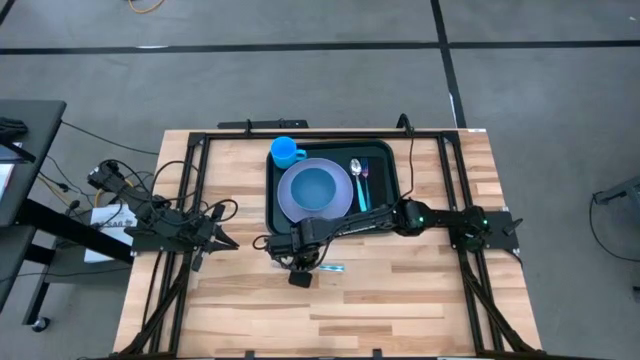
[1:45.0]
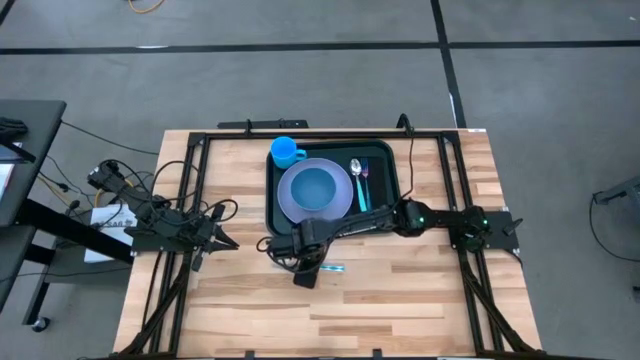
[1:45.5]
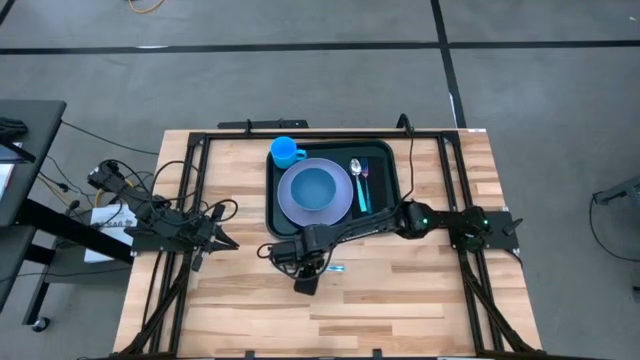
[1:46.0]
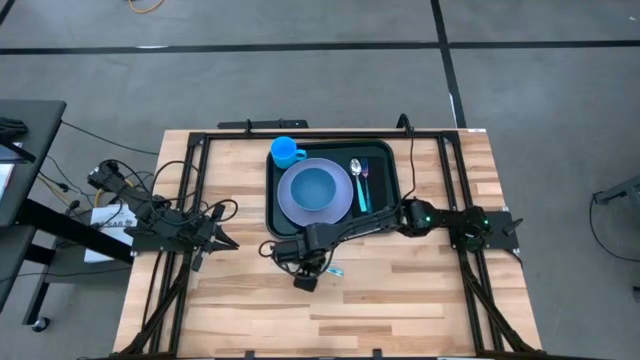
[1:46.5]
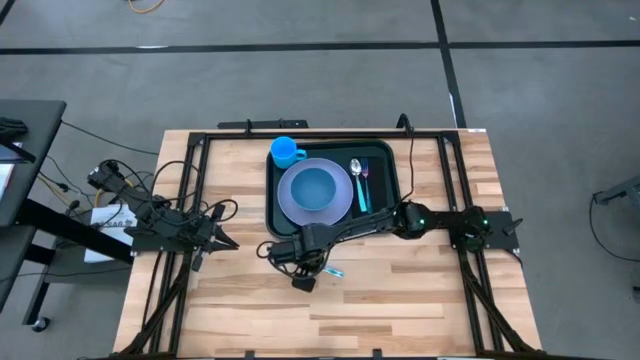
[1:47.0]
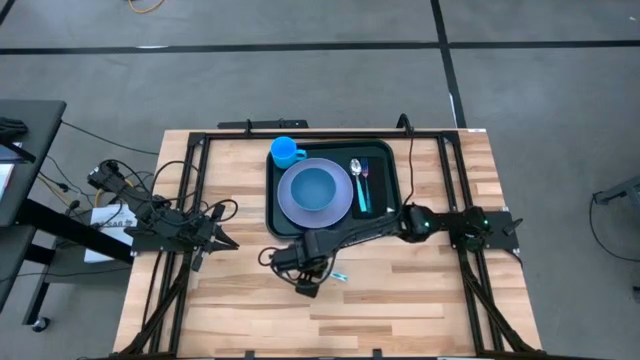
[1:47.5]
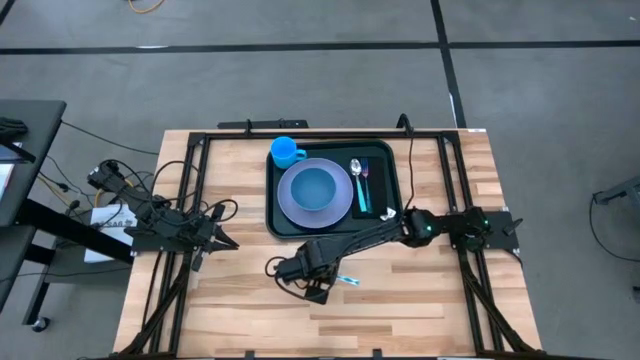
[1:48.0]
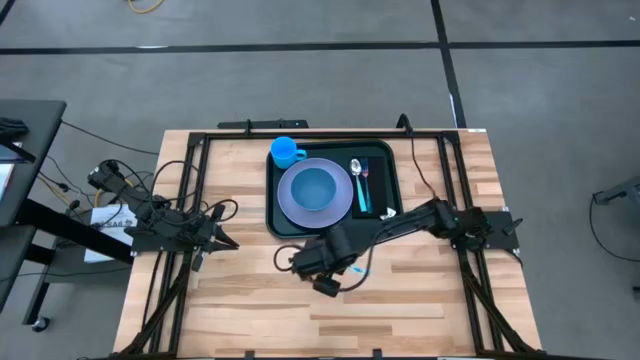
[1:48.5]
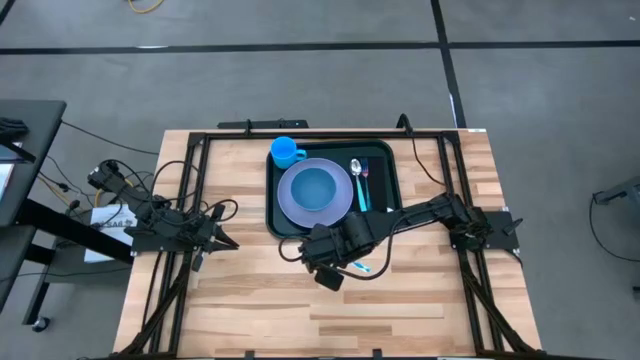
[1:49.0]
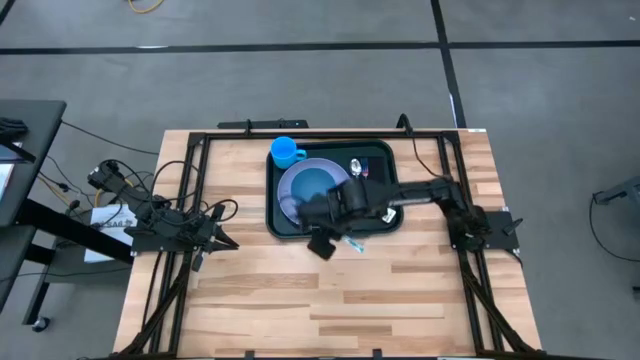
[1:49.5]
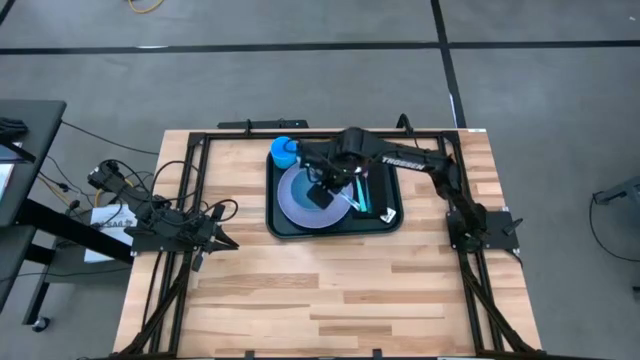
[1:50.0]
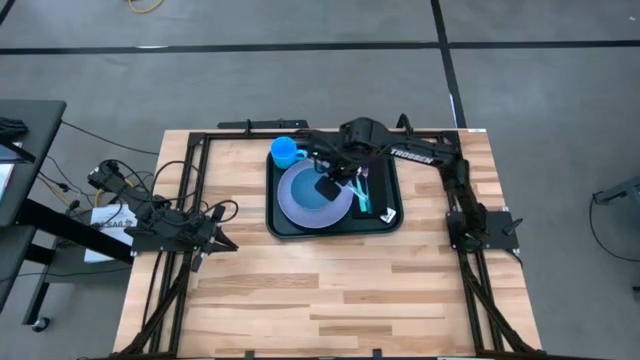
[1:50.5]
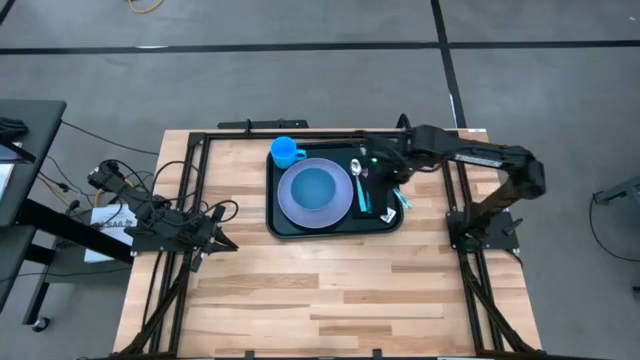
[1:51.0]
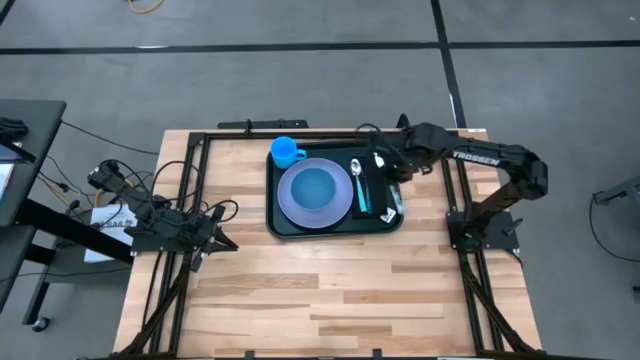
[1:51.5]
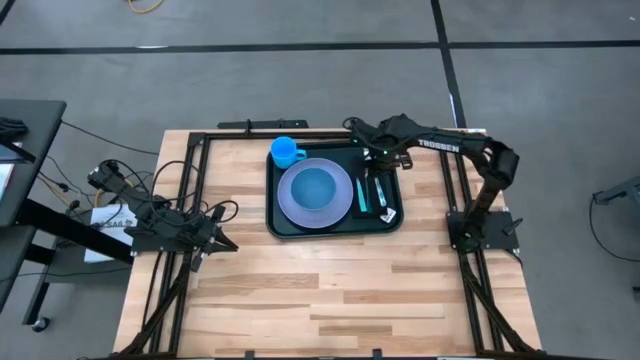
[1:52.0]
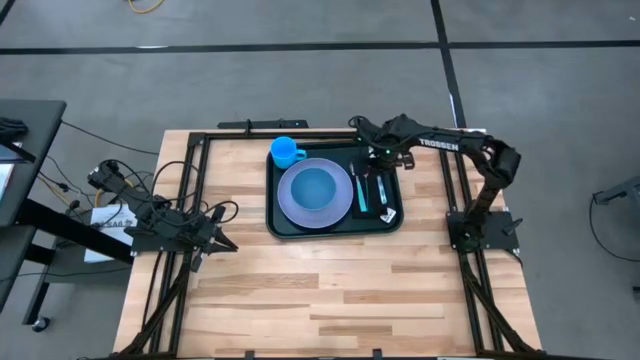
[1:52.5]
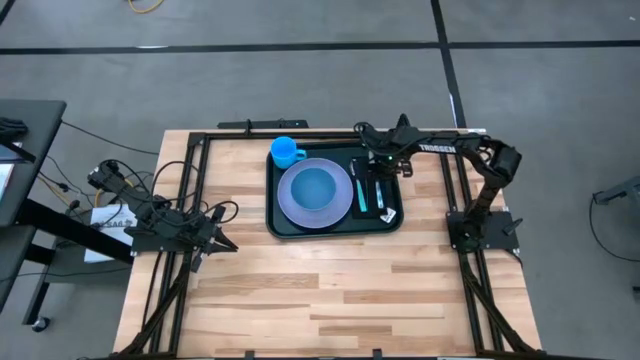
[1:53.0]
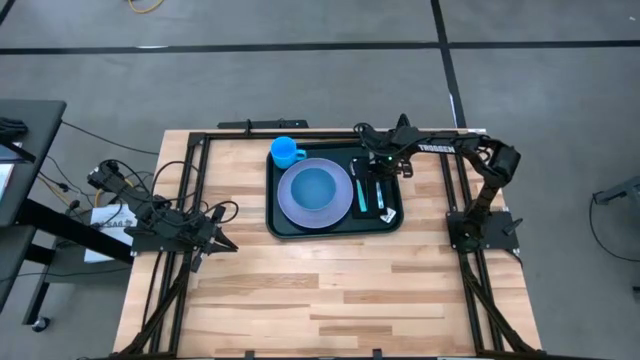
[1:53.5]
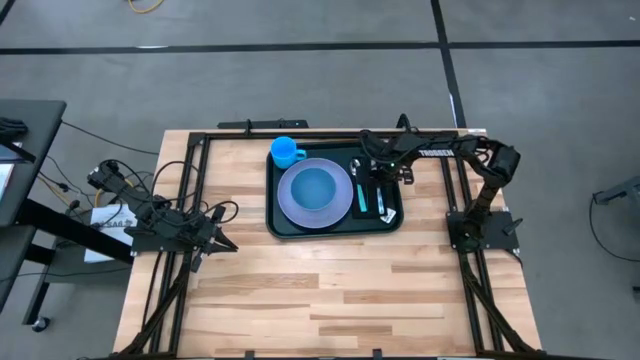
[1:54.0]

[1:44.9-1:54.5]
Task: Set up tray
Put the white/blue patterned knife on the black napkin

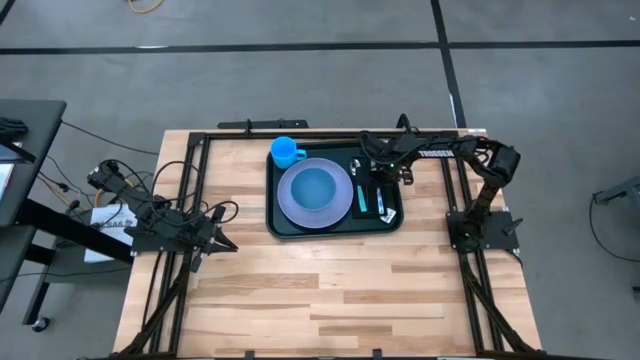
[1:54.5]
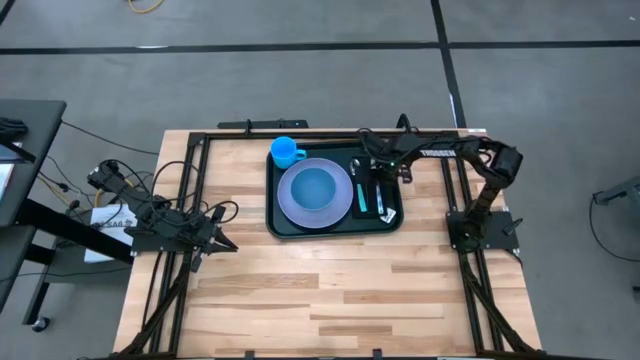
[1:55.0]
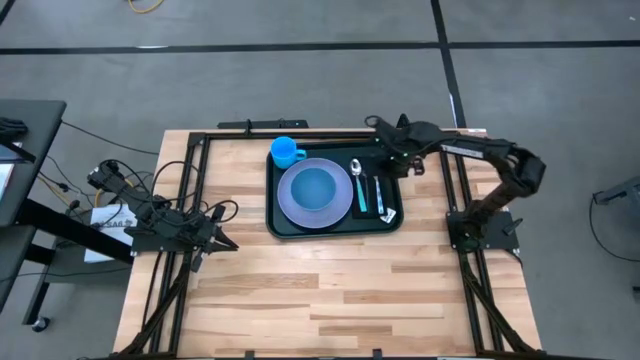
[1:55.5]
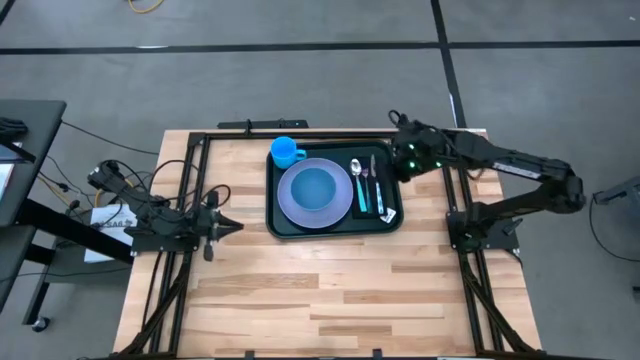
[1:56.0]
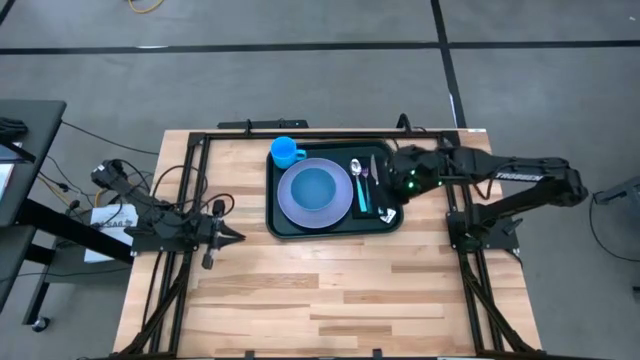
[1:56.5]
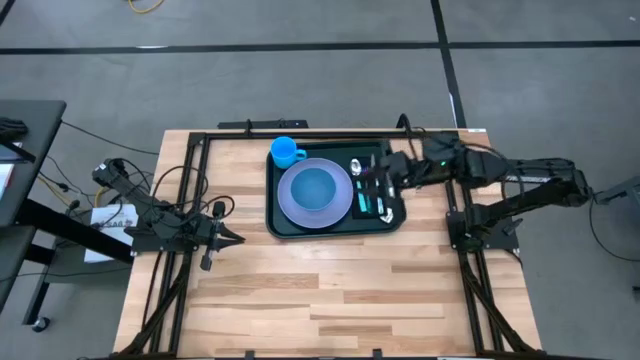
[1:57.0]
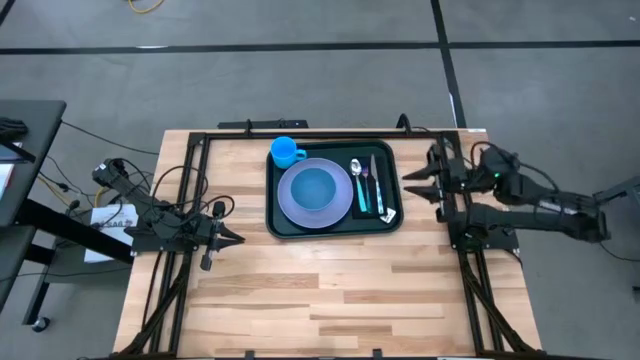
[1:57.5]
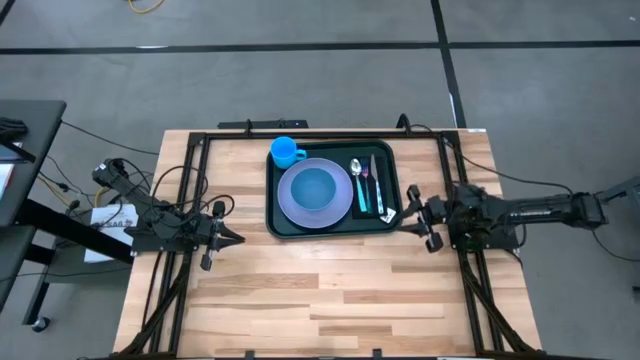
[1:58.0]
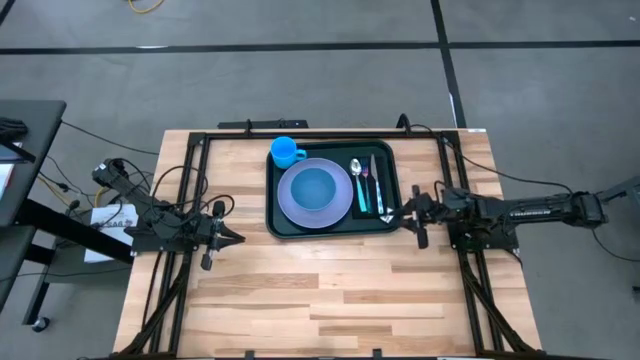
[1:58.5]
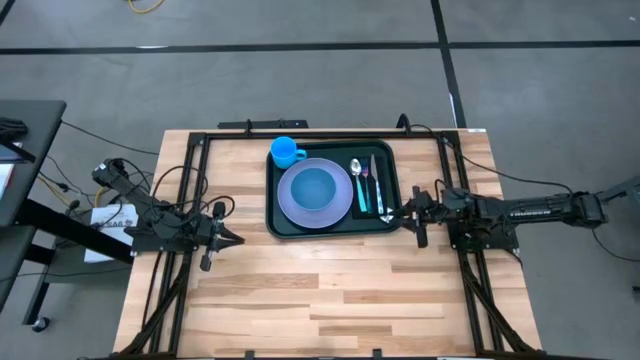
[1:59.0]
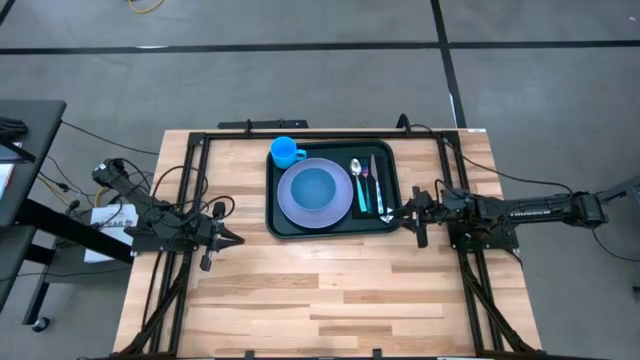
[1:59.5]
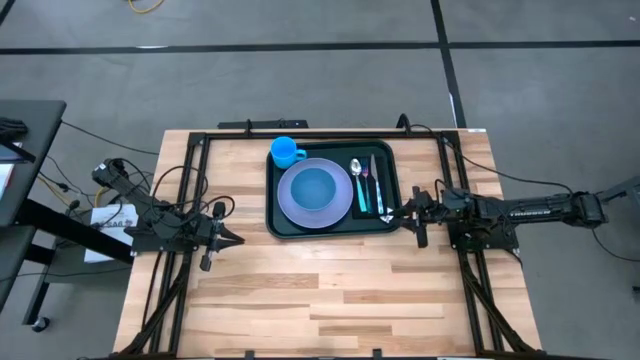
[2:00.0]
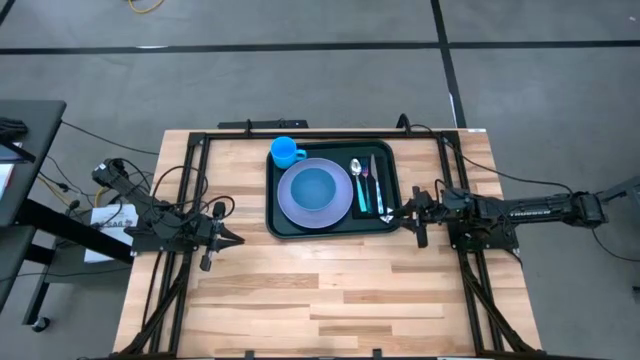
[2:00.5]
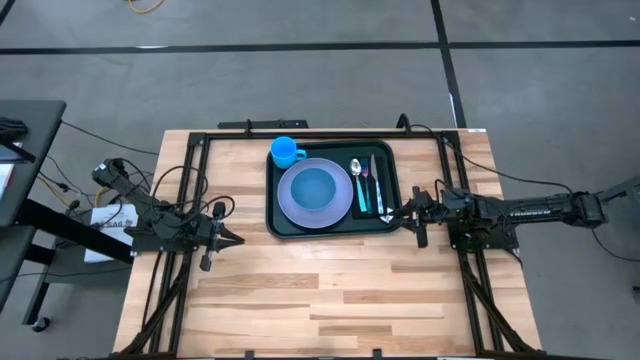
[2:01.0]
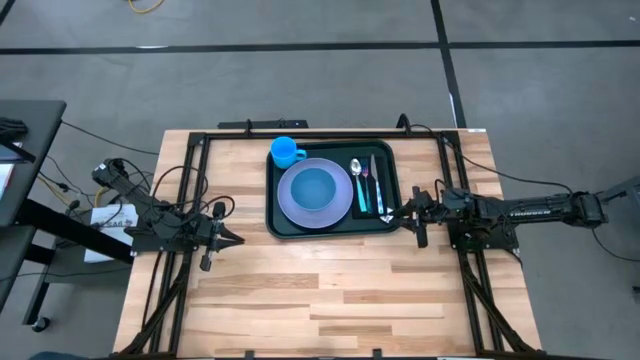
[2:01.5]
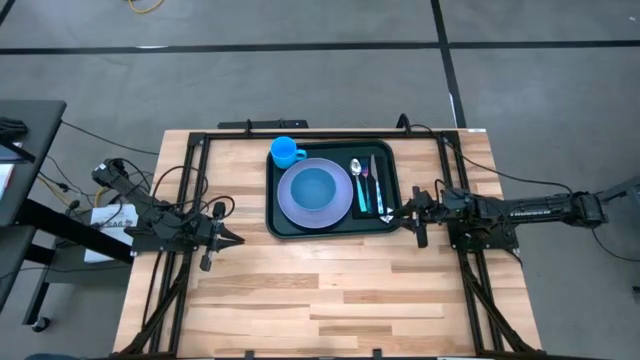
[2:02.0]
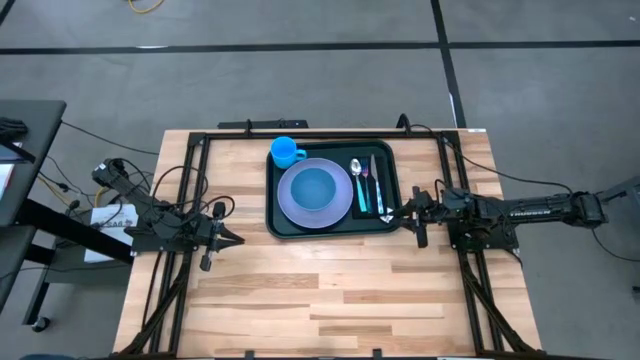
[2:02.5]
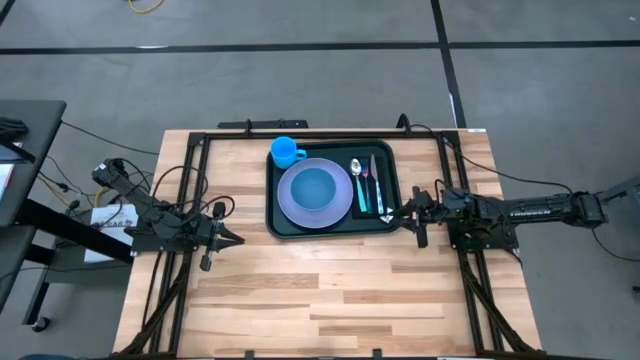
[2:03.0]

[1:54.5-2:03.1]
Return to Home Position
